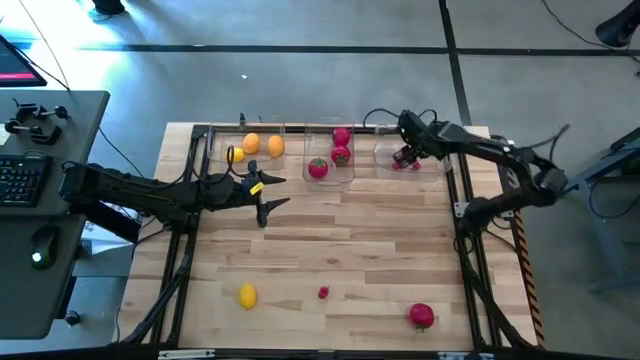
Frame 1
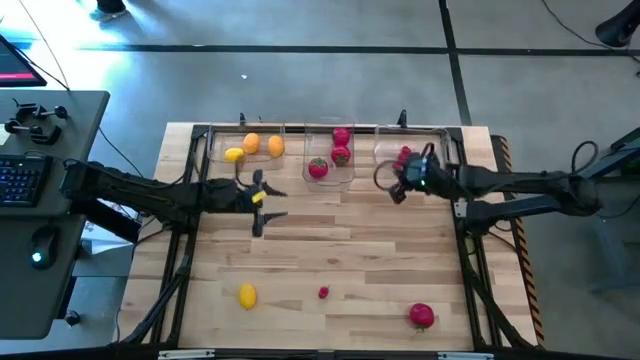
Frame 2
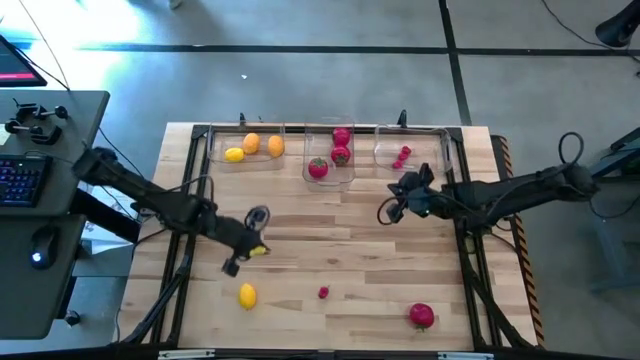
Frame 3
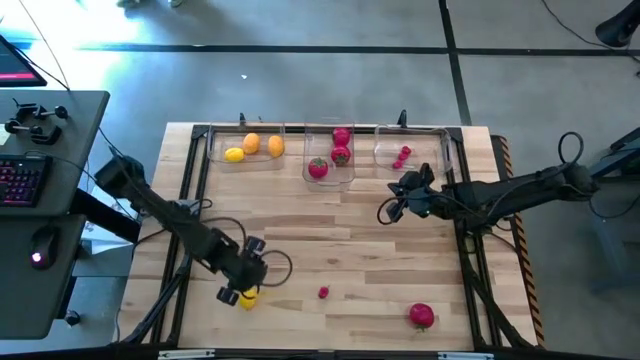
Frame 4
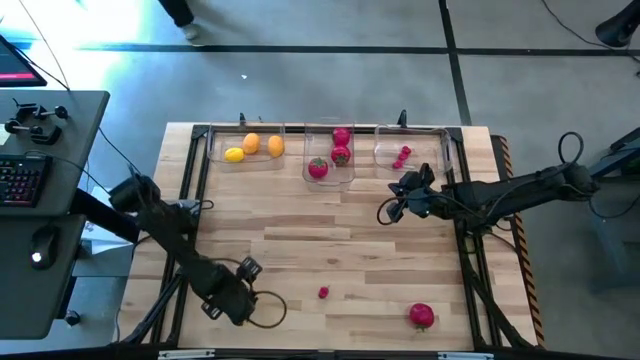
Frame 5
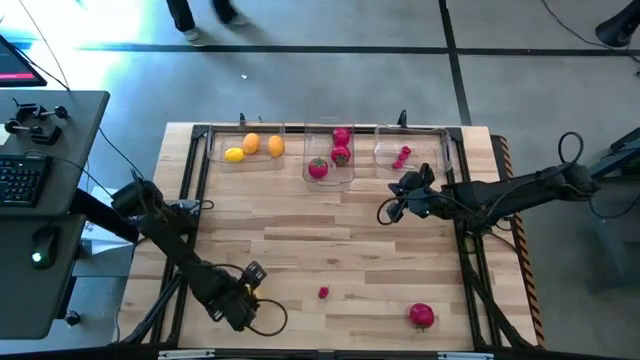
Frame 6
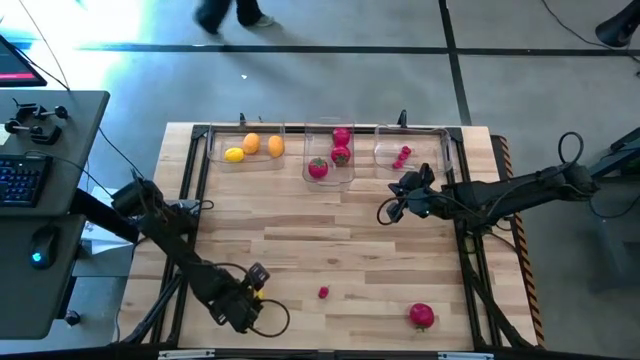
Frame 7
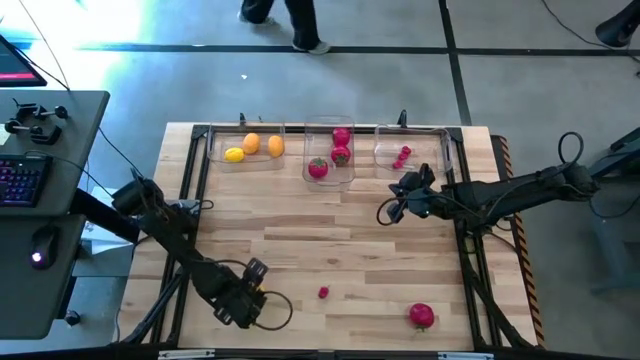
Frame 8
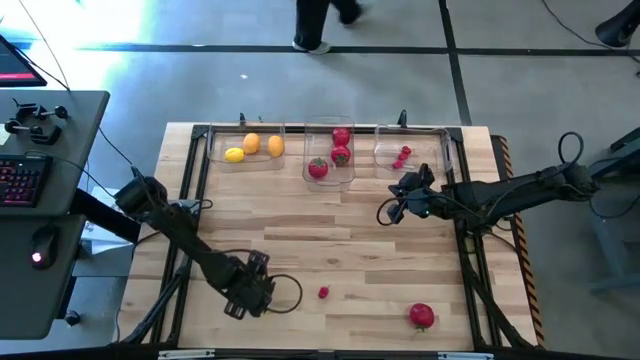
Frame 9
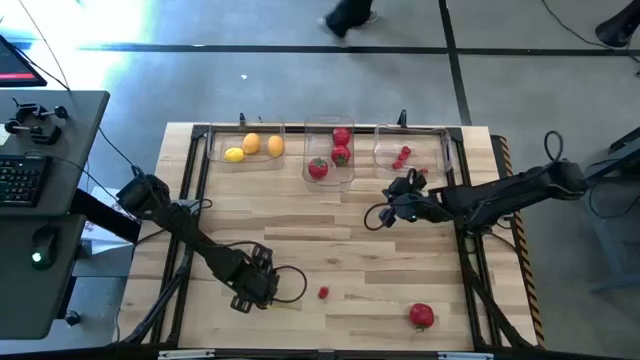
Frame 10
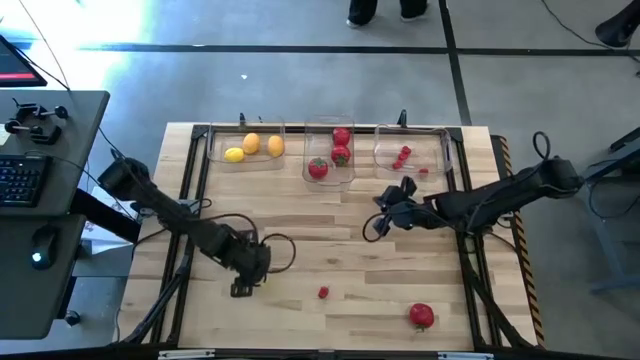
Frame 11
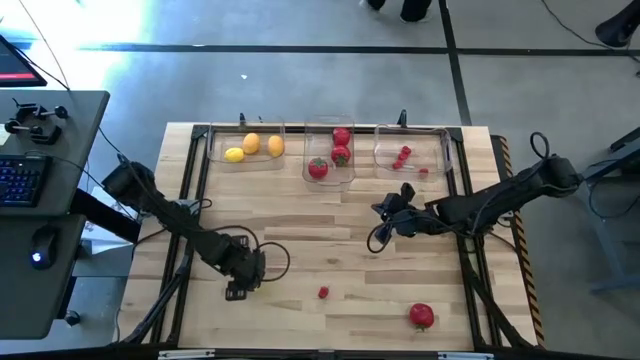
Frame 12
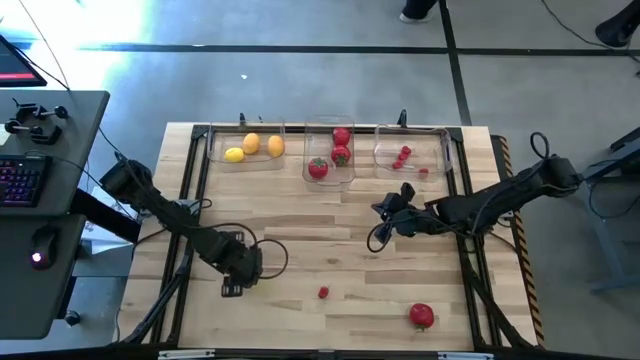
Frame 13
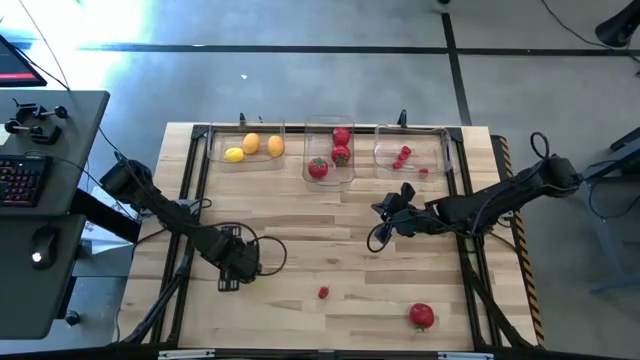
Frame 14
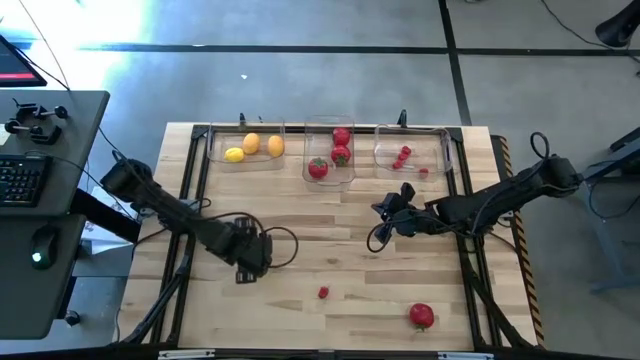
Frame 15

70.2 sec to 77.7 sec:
Task: Sort produce into baskets
Put the lemon into the left transparent bin

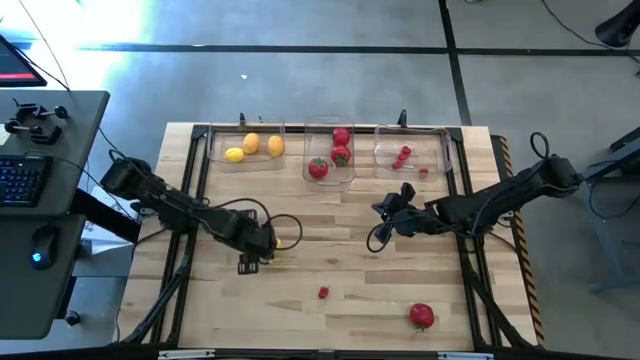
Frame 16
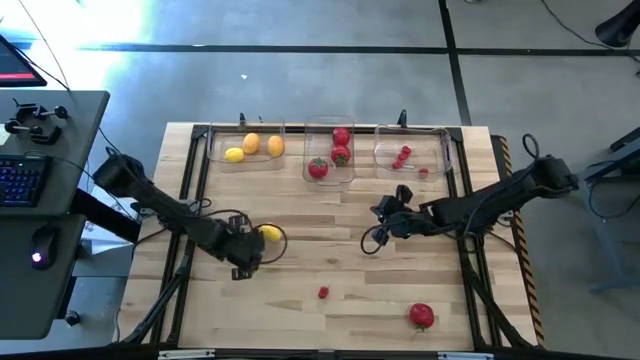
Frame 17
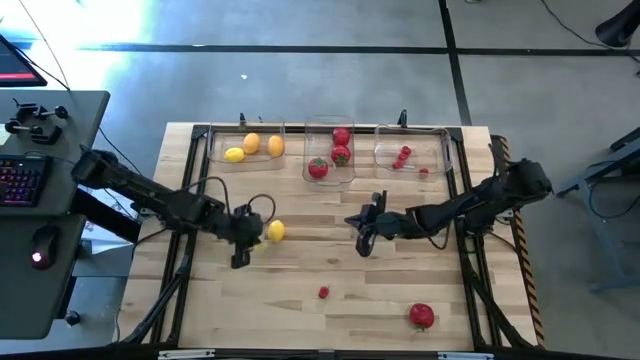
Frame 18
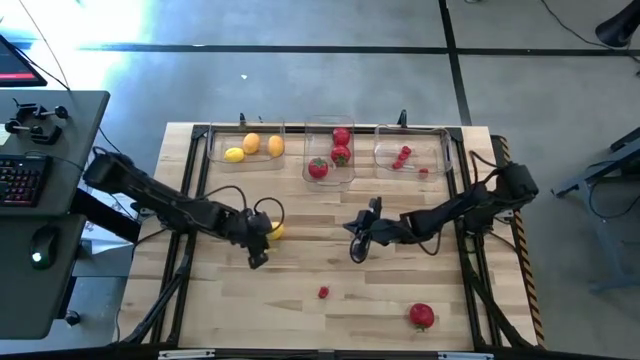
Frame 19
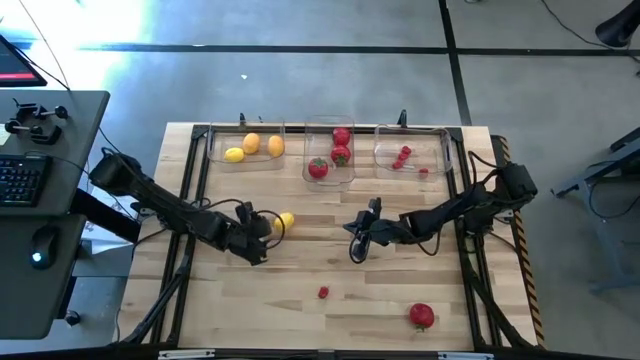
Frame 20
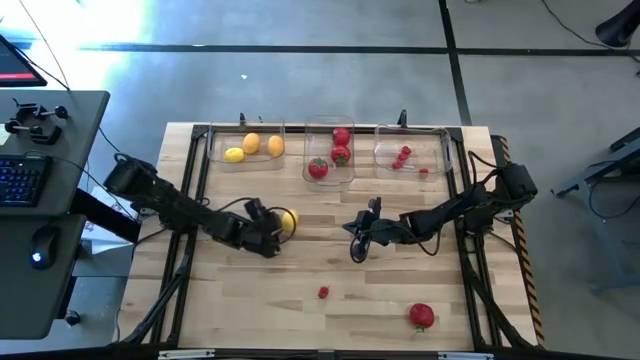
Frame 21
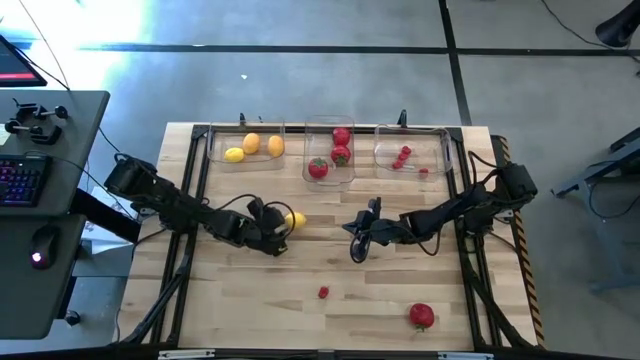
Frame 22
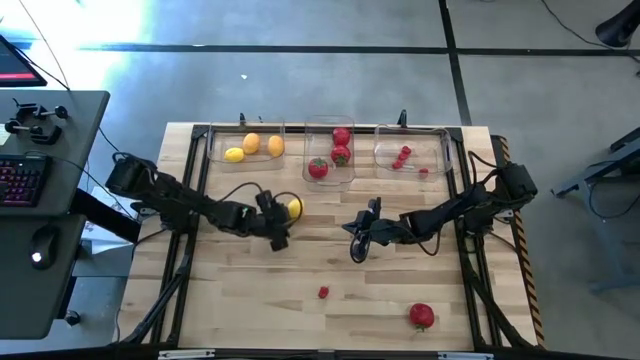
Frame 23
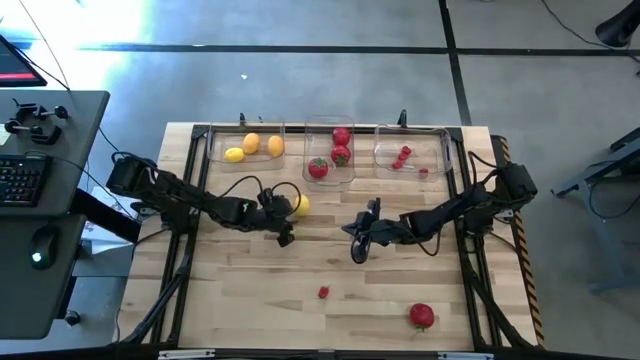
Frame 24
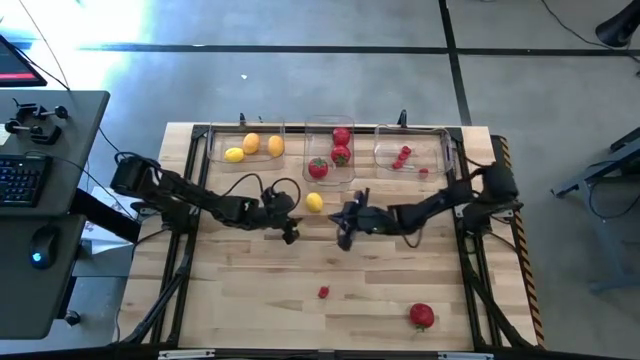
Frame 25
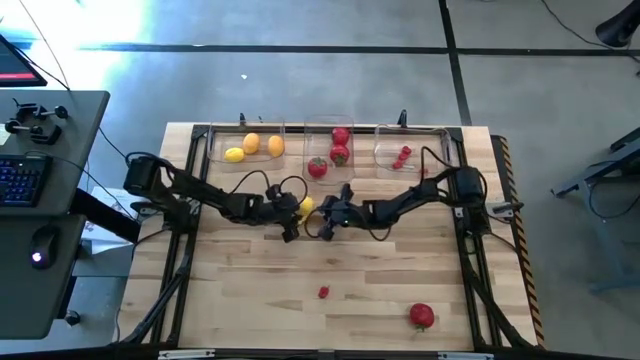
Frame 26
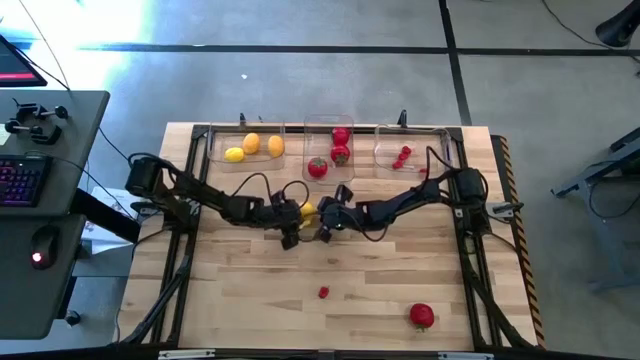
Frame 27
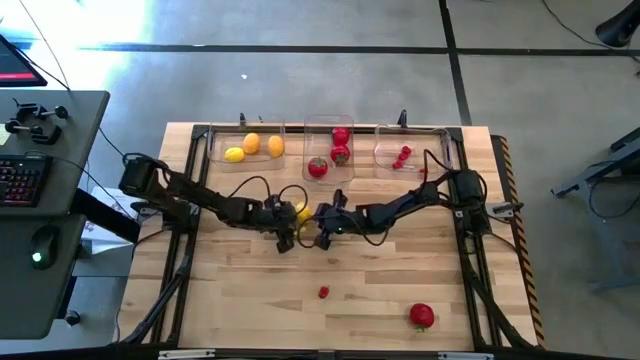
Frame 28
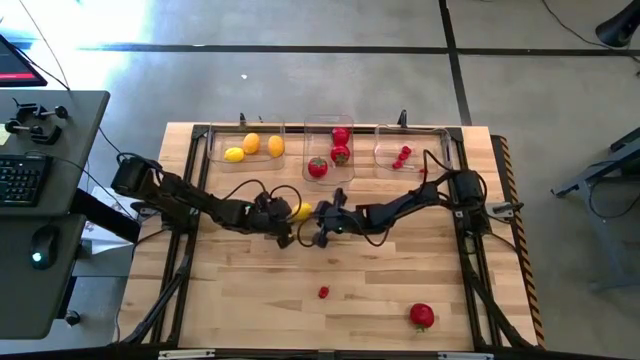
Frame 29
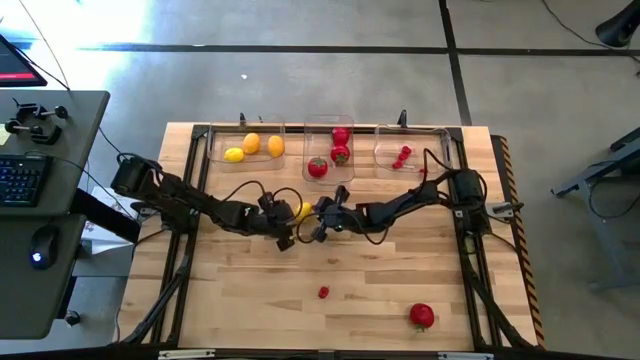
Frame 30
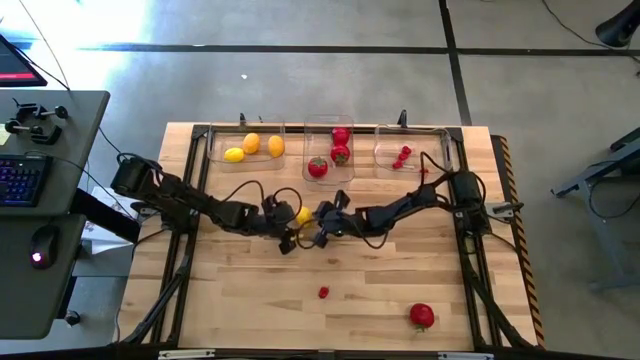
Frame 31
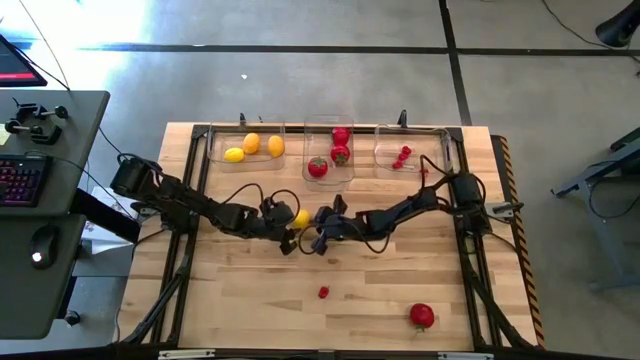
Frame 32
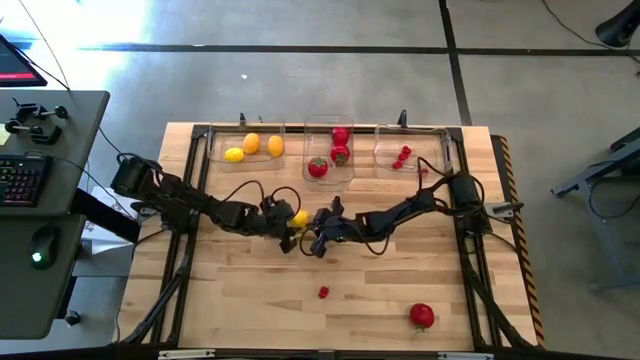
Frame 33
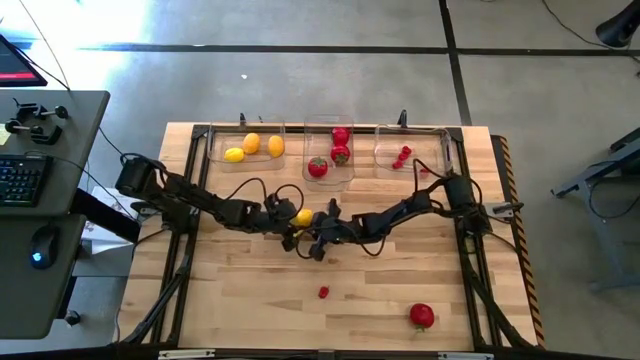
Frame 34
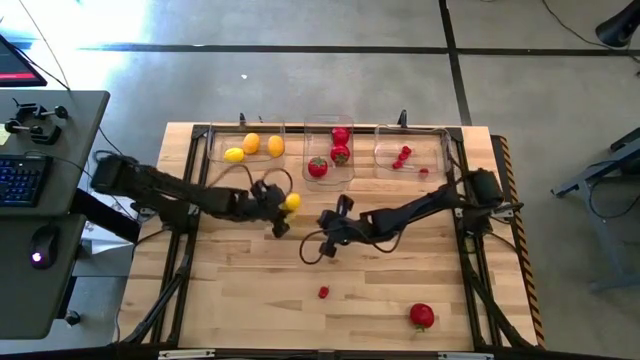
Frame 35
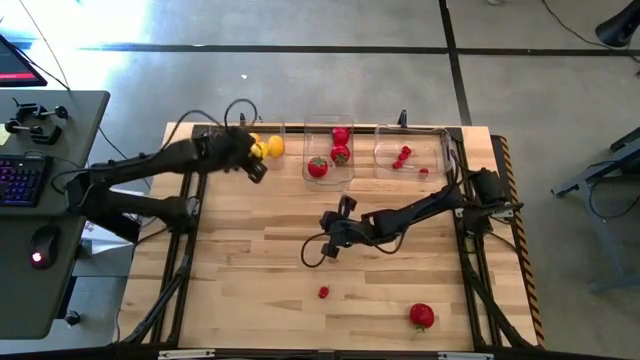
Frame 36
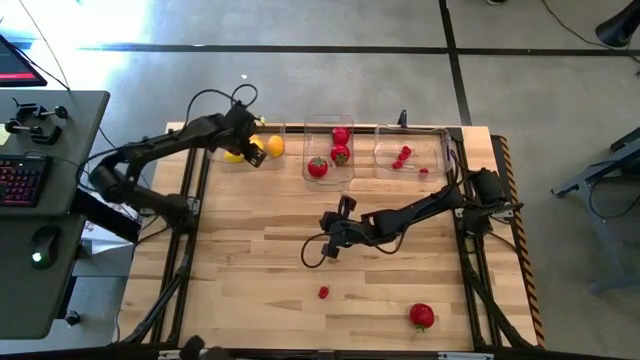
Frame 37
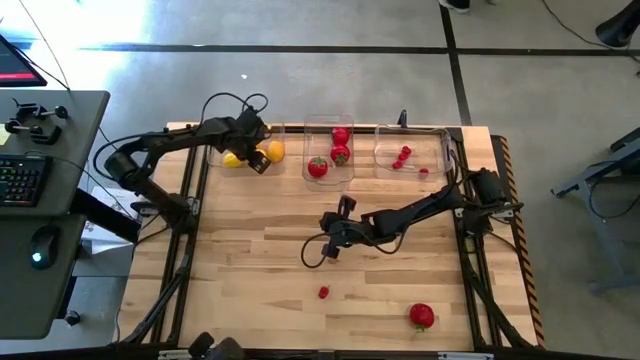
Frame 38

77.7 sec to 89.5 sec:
Put the lemon into the left transparent bin

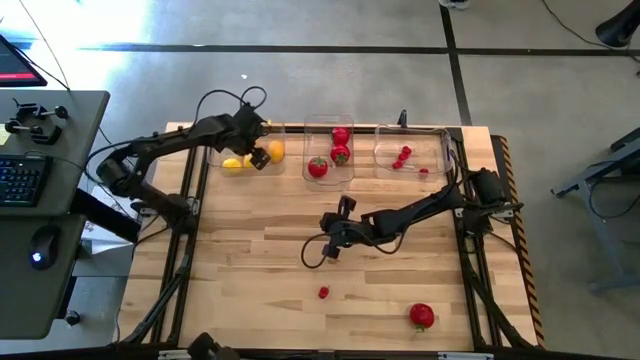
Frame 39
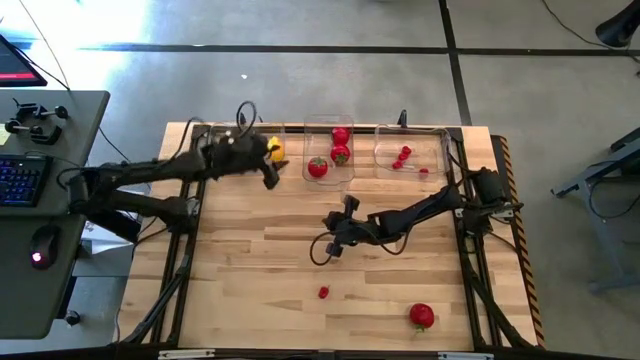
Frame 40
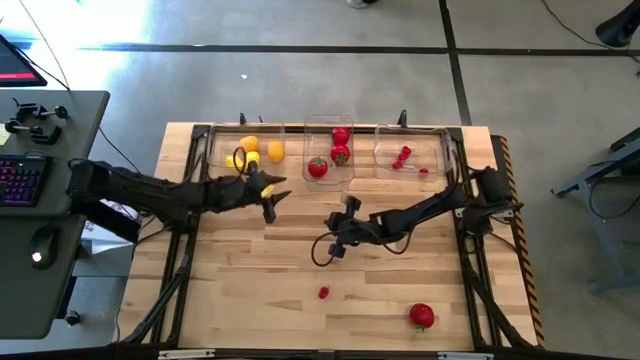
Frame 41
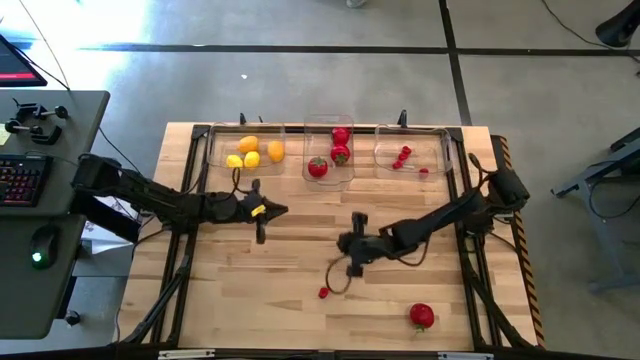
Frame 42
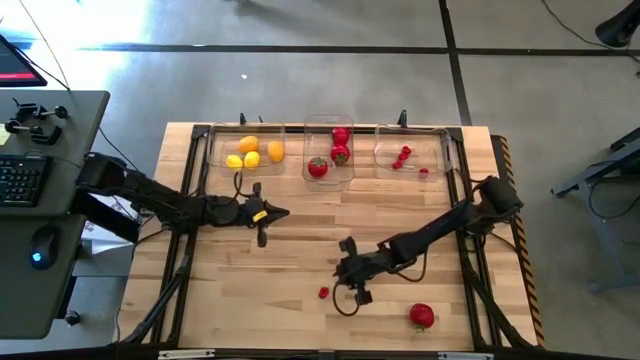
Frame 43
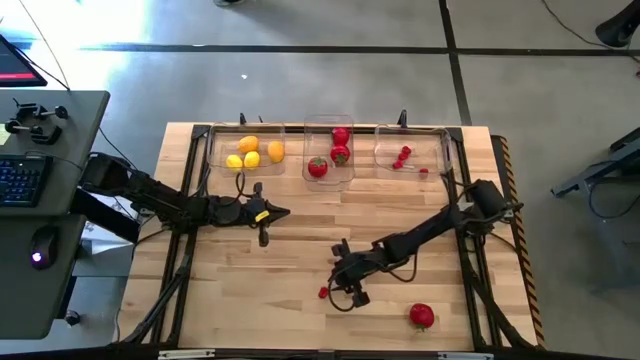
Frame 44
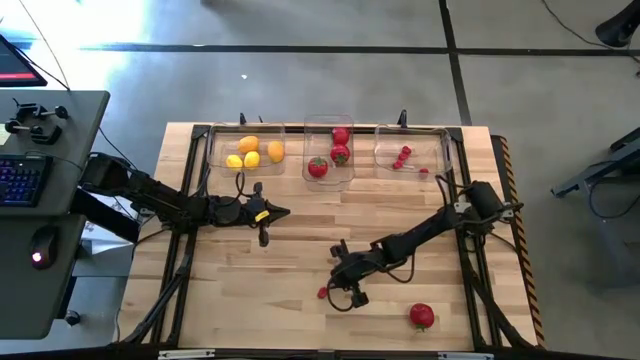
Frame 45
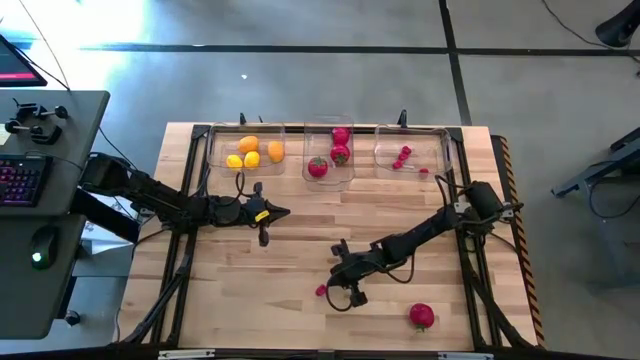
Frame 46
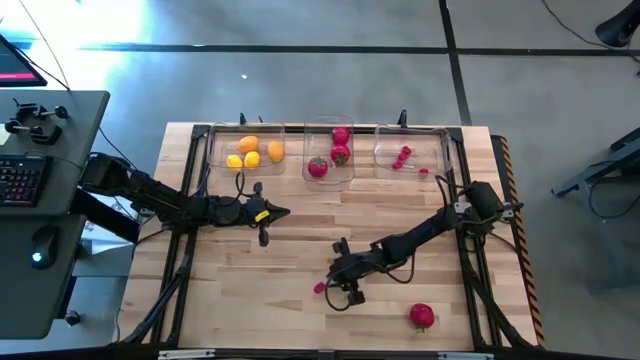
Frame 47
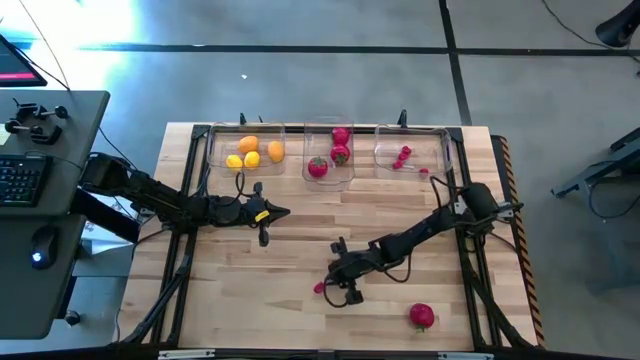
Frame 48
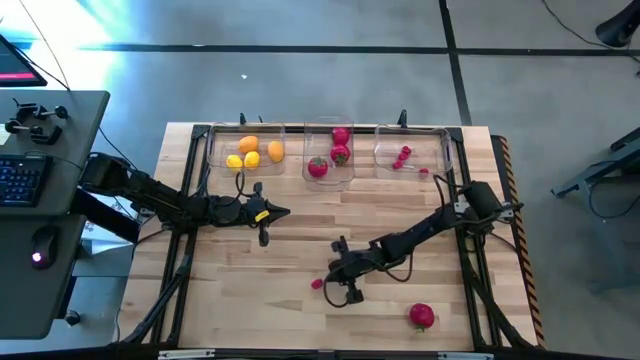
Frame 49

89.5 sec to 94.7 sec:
Put the chili pepper into the right transparent bin
